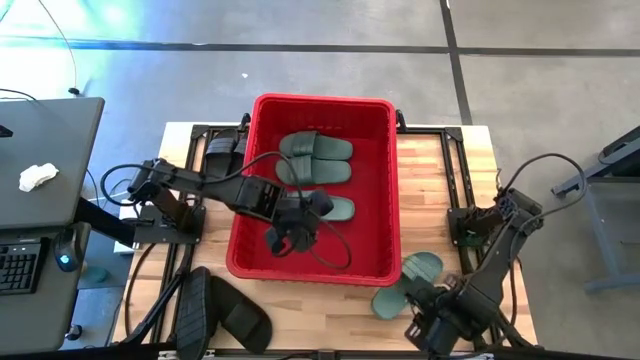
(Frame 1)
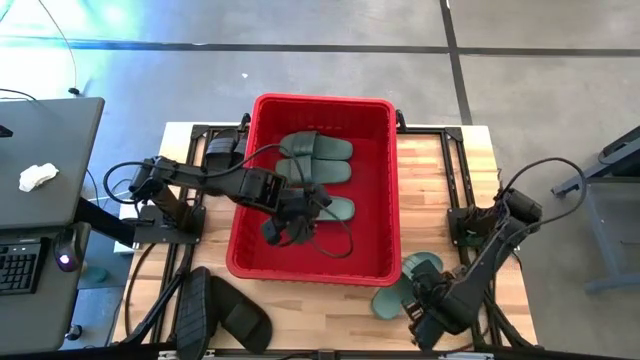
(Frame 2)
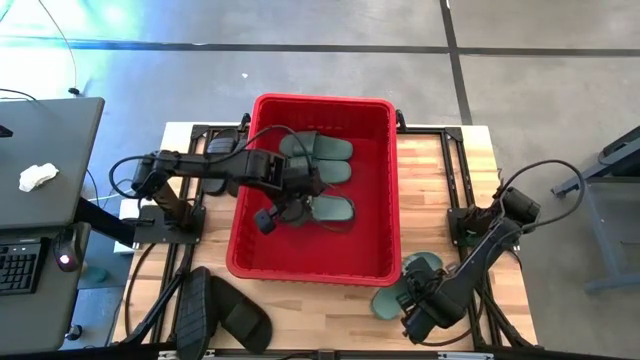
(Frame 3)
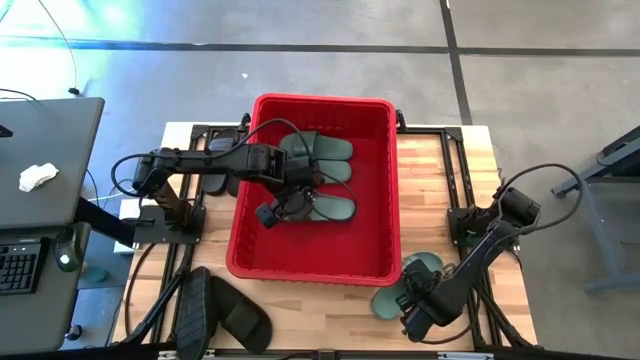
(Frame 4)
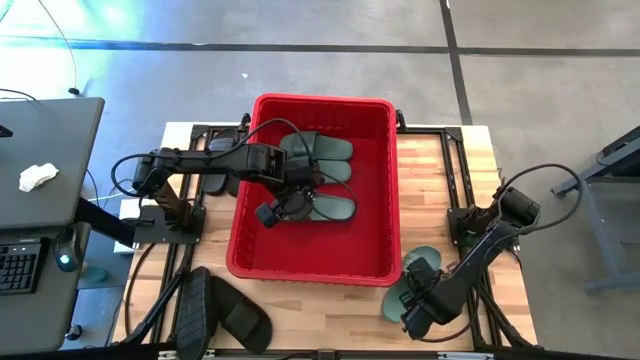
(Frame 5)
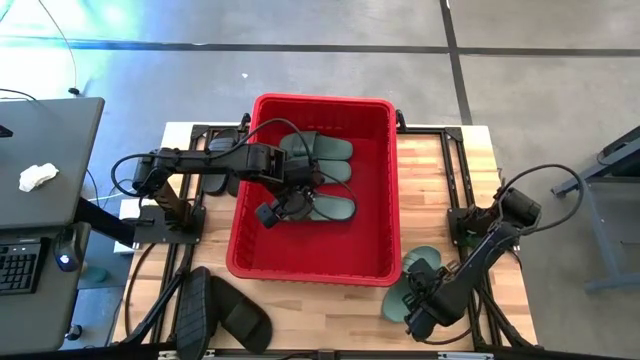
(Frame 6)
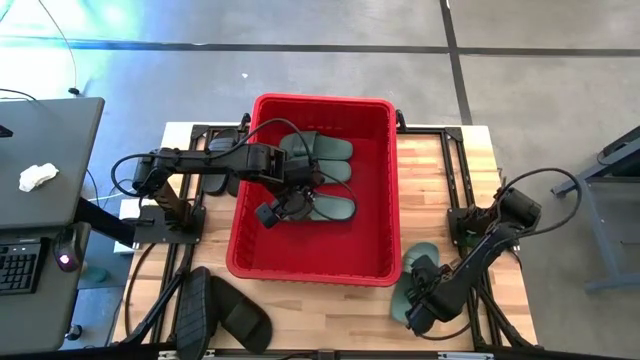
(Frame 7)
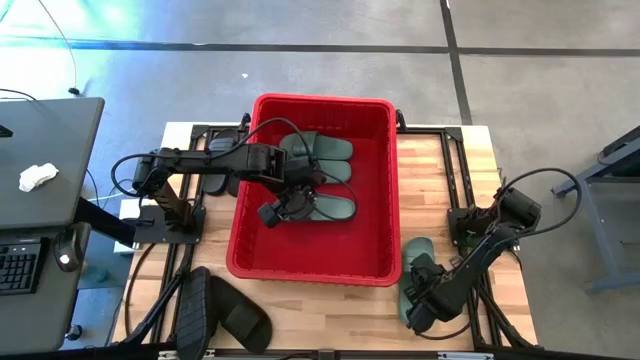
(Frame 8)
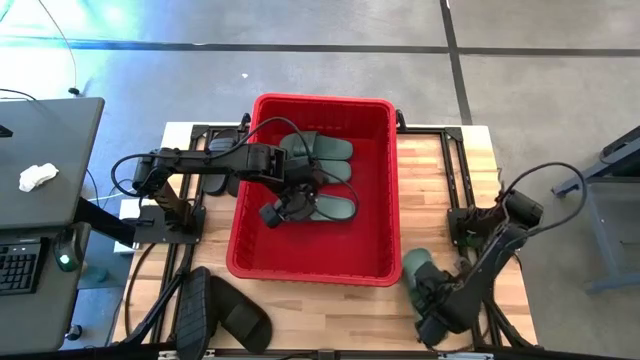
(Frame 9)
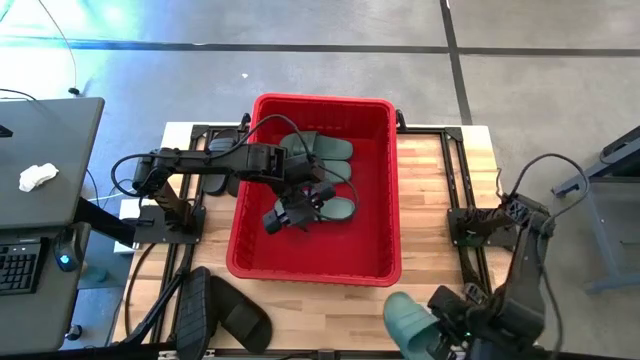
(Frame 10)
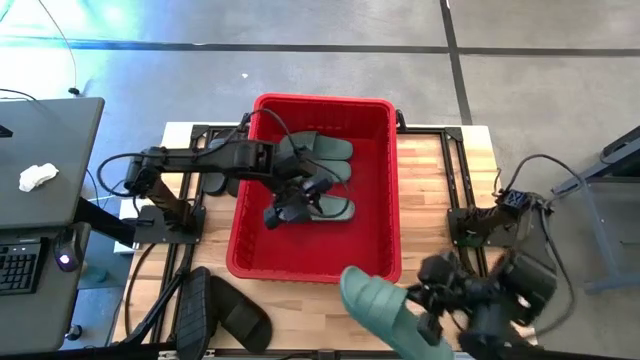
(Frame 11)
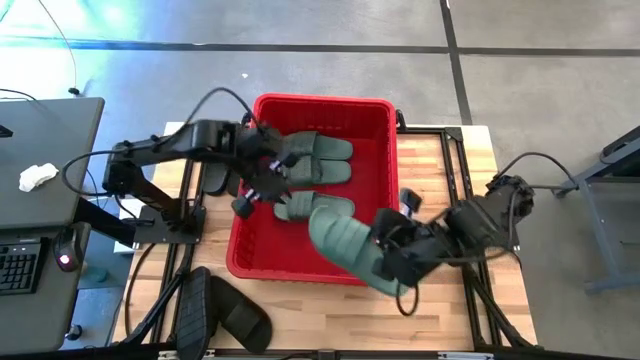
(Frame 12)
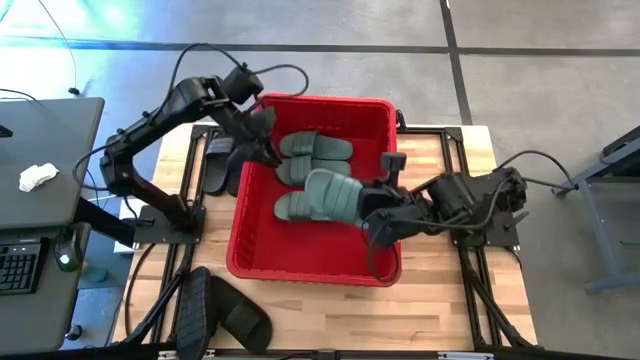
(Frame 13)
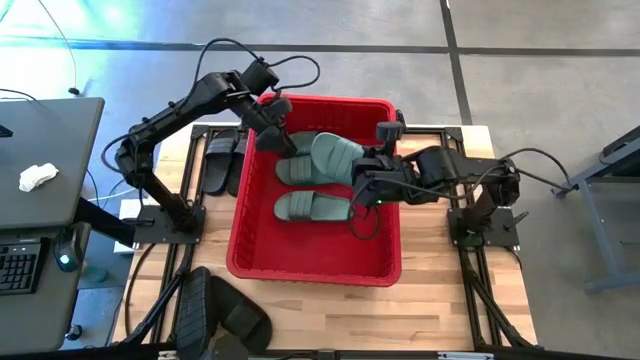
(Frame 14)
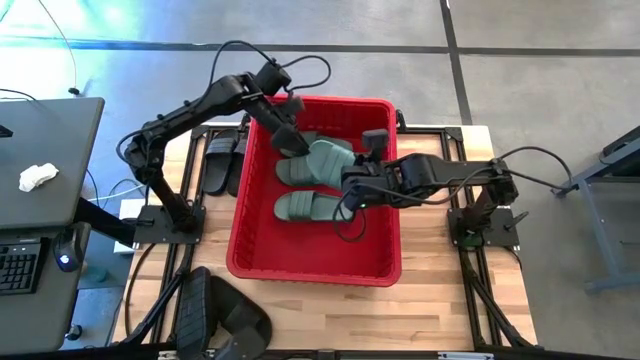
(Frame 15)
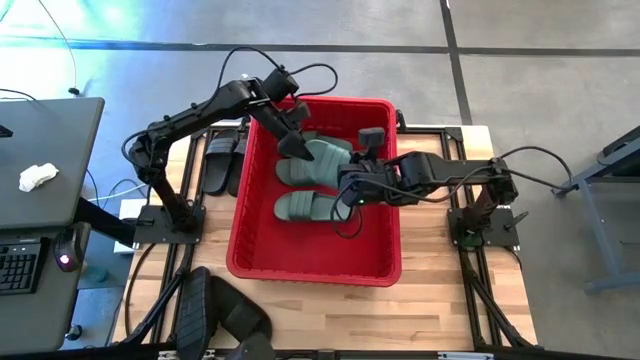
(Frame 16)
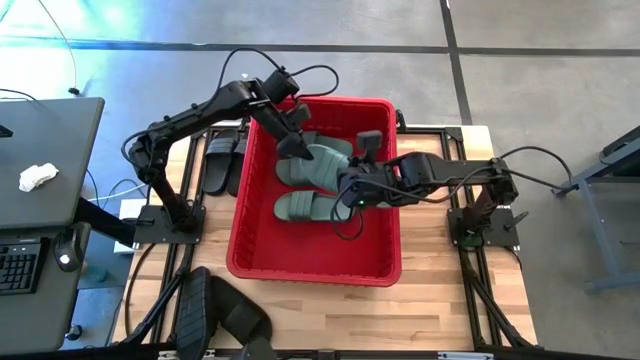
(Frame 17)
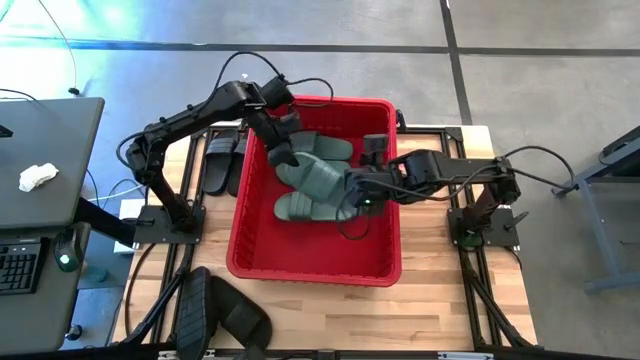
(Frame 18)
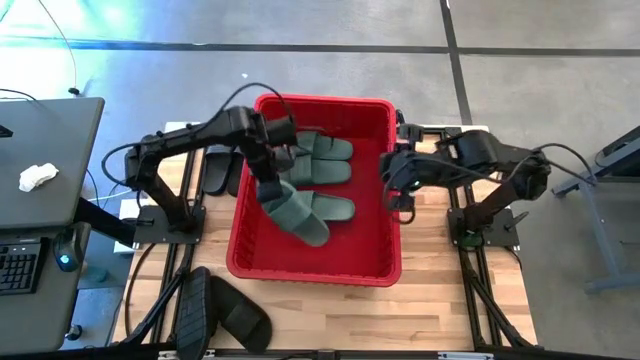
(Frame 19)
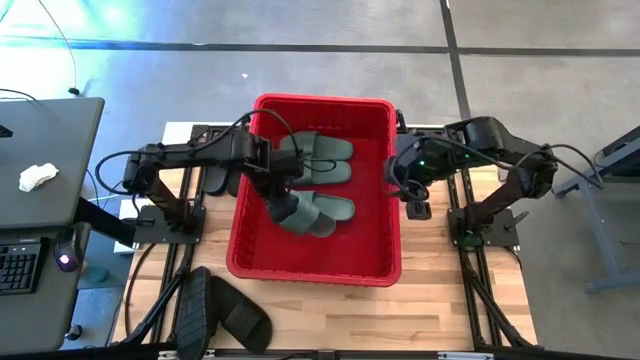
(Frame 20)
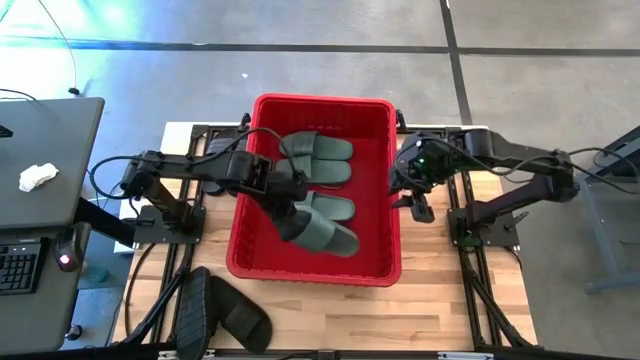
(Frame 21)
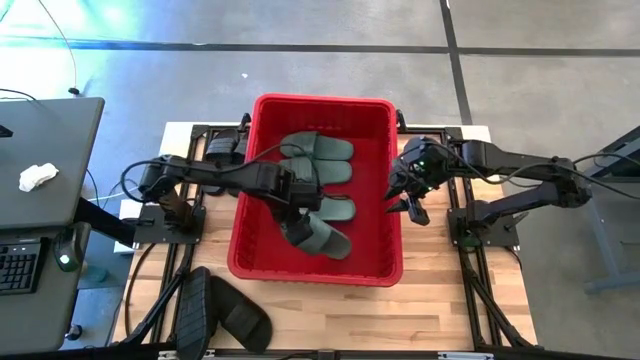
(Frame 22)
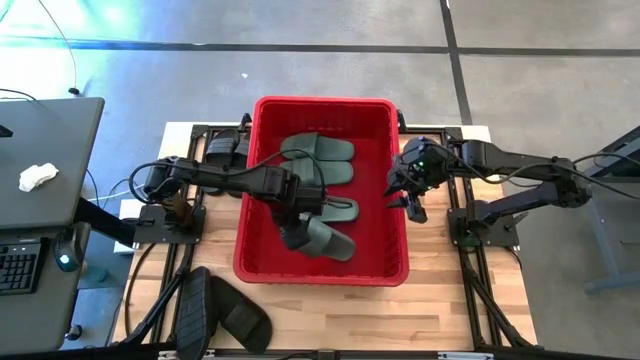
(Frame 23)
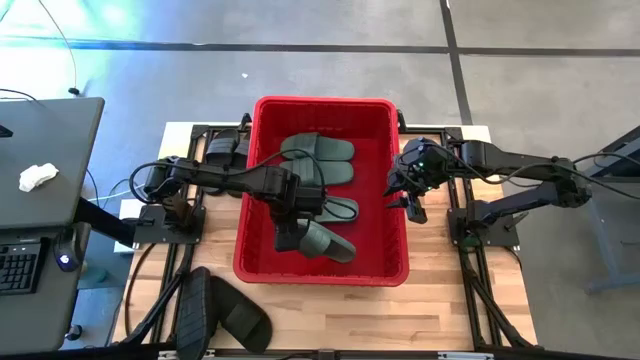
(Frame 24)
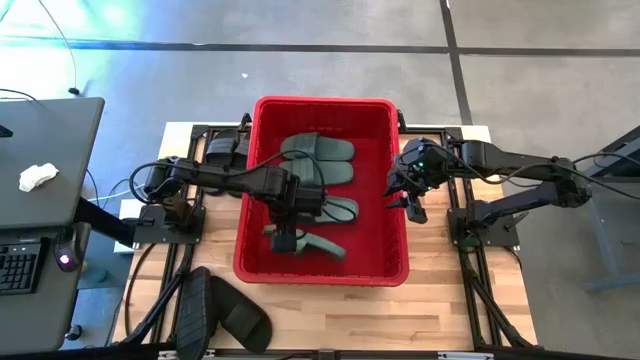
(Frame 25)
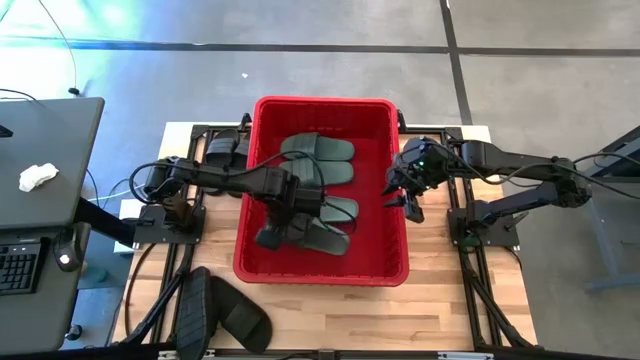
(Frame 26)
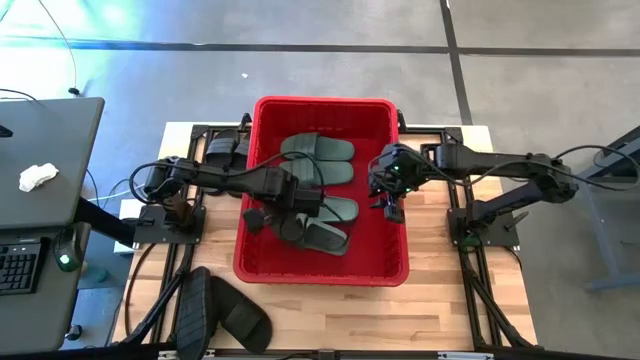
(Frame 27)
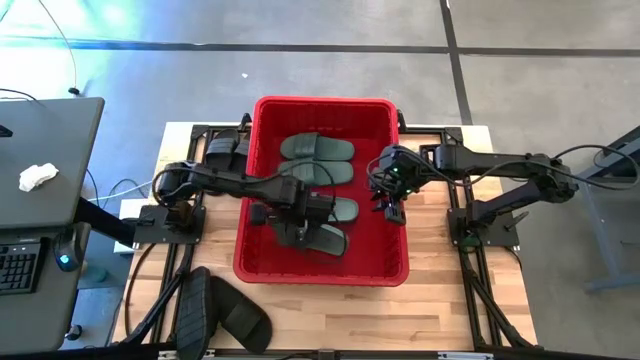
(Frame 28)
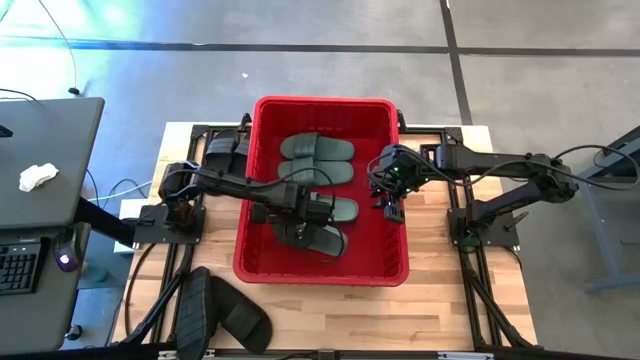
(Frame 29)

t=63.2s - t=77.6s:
Task: Pick and place slides into bin
Put the green slide into the red container

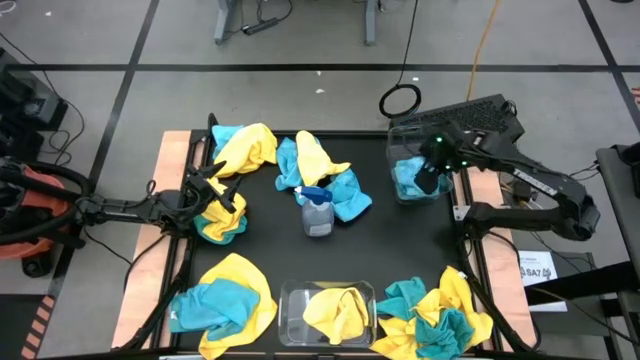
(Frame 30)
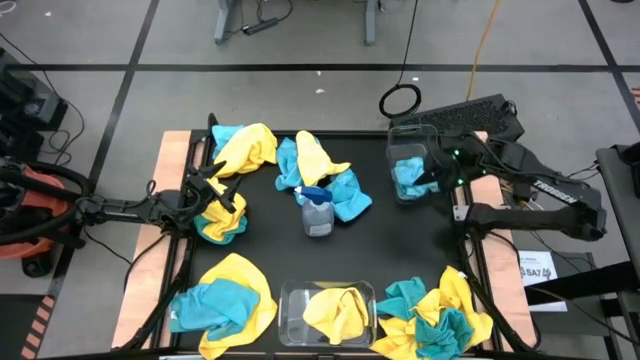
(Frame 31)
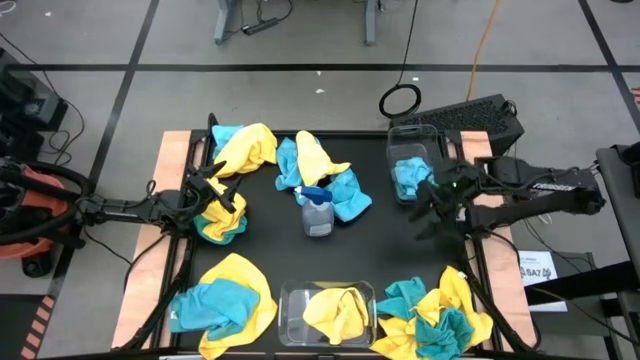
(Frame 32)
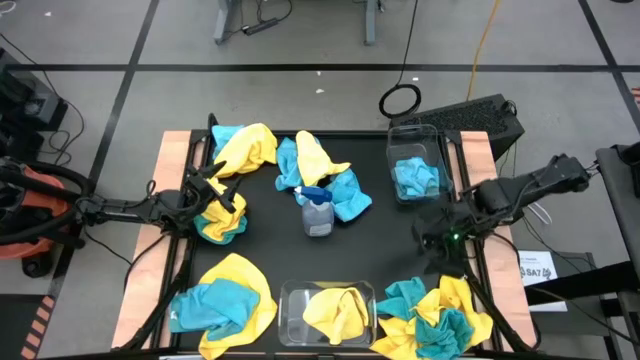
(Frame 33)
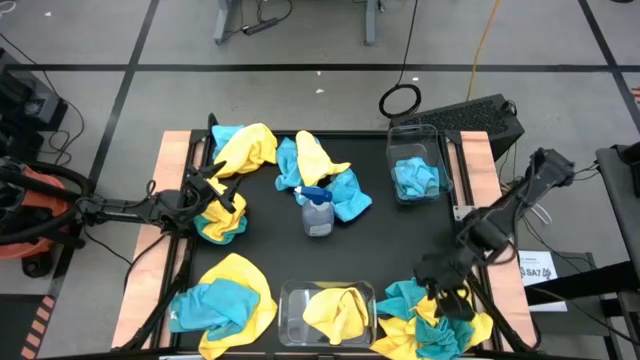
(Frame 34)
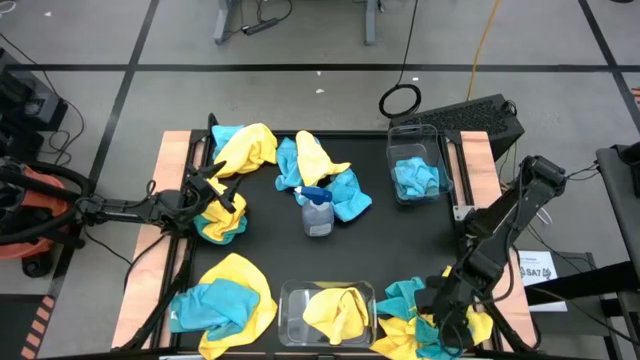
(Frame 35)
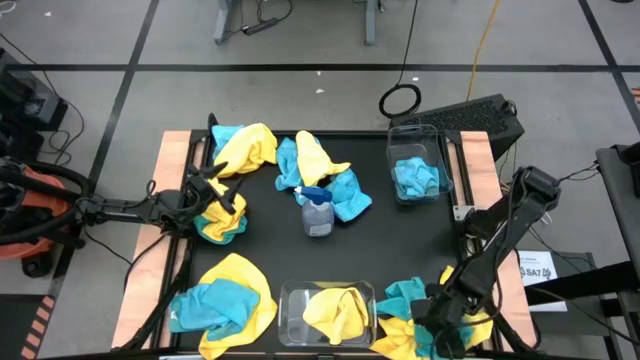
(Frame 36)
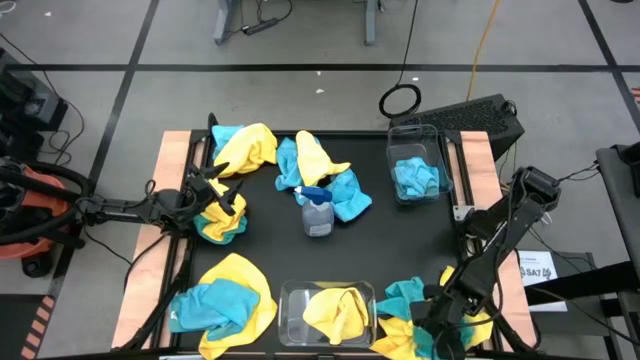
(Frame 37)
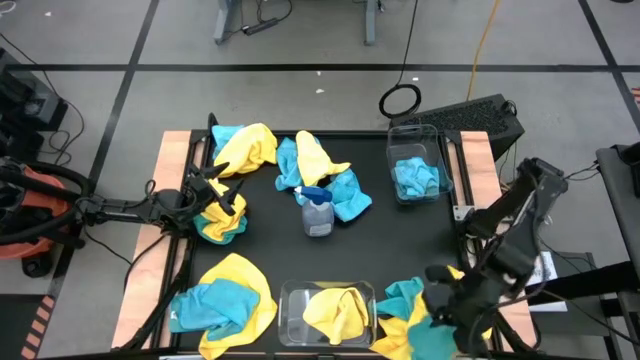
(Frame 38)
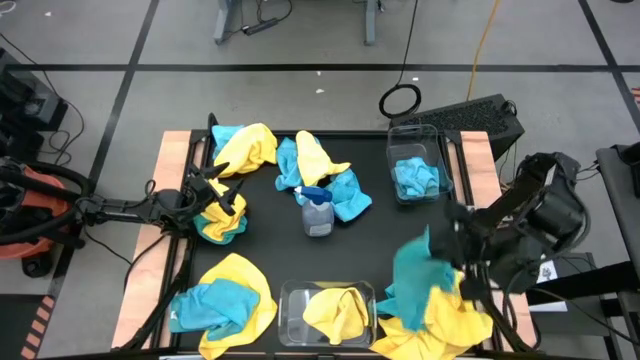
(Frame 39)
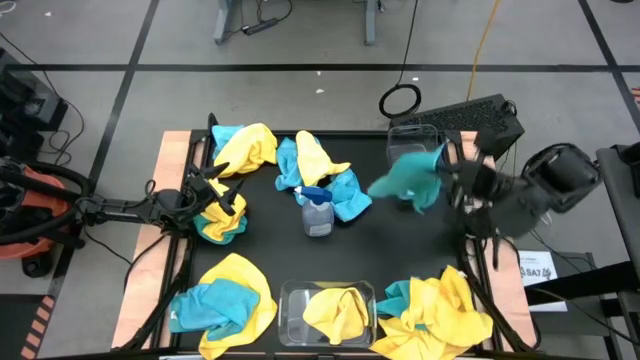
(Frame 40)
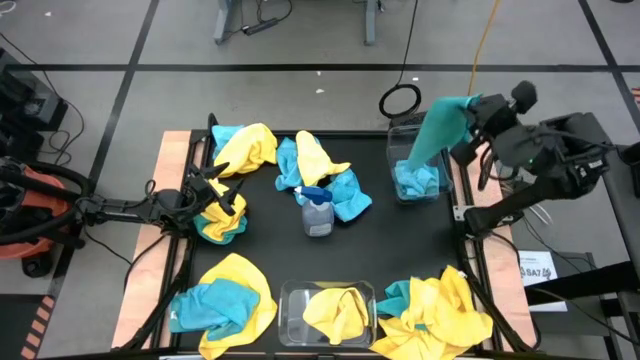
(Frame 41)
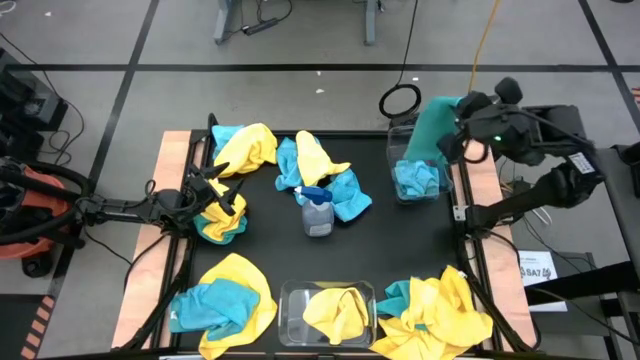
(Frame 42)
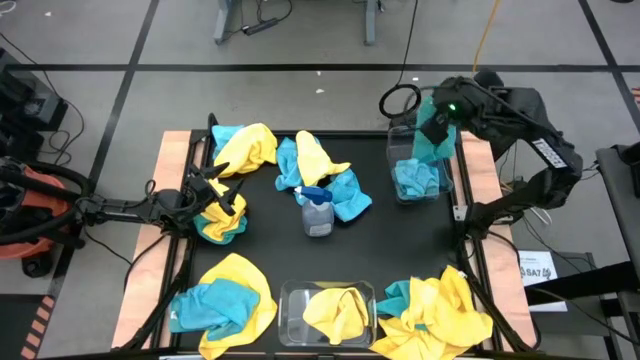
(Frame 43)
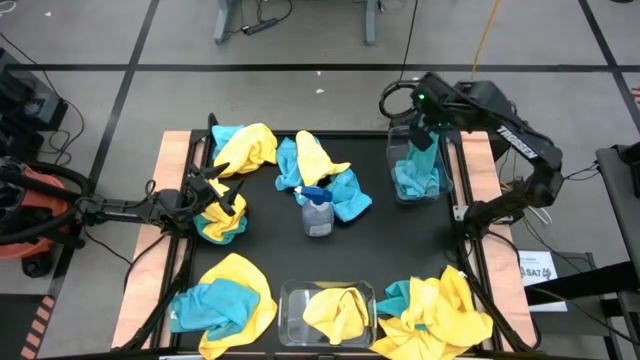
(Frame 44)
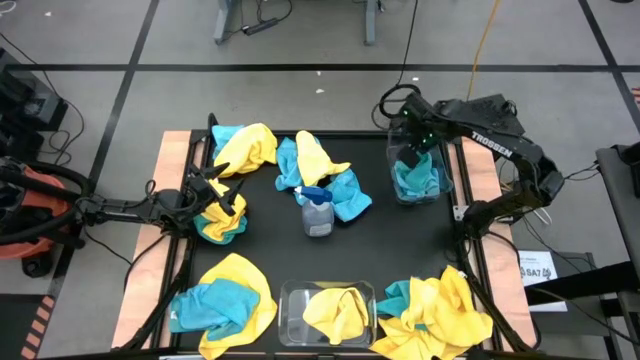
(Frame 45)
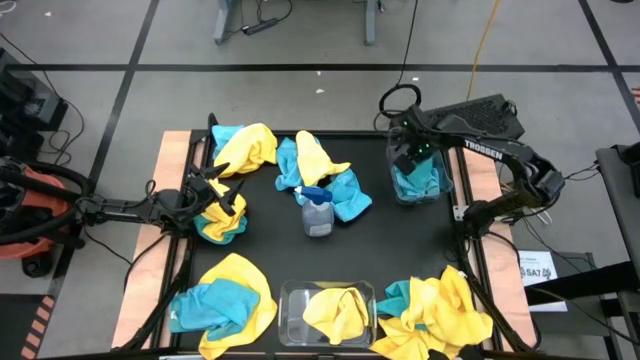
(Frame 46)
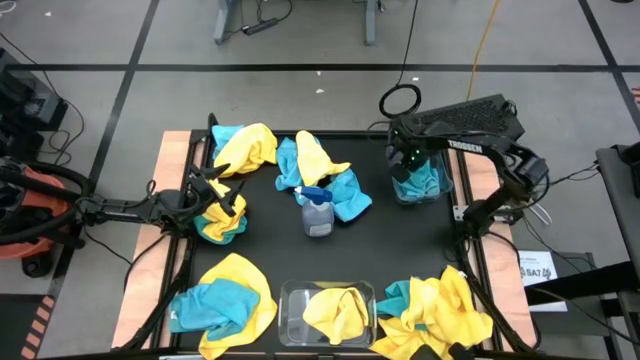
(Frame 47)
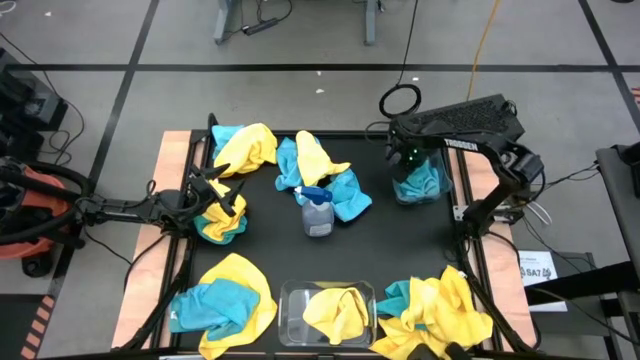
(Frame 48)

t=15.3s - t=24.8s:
Task: Sort microfiber towel by color & place in baskets
Put the blue towel into the top transparent bin
